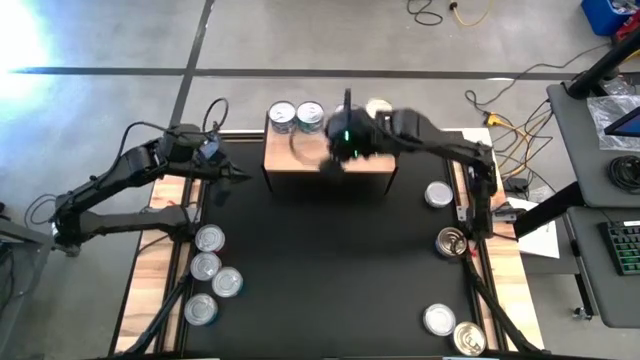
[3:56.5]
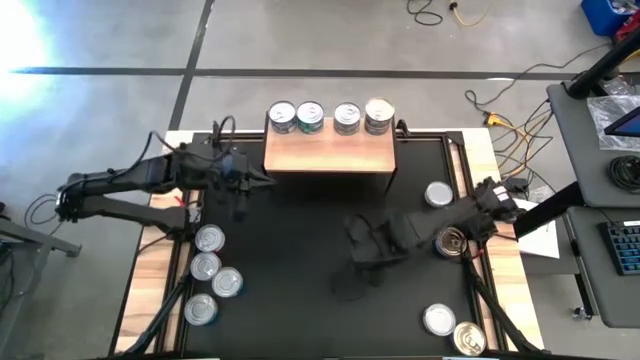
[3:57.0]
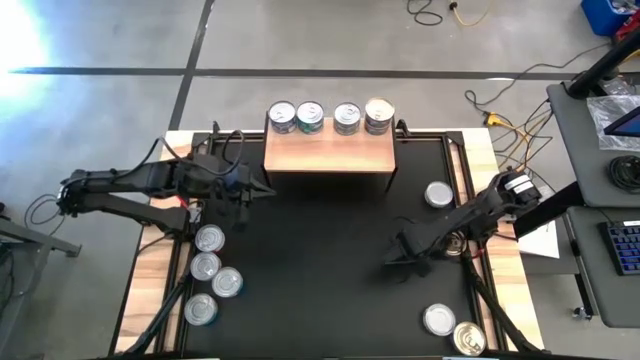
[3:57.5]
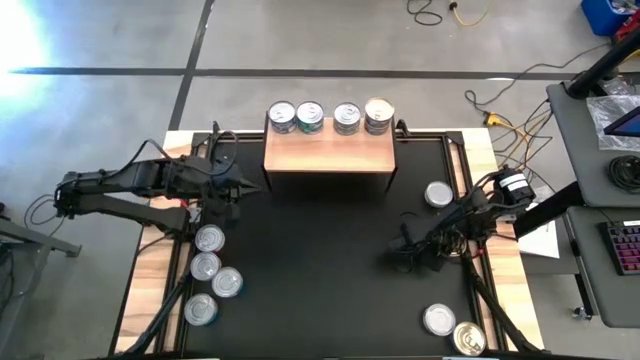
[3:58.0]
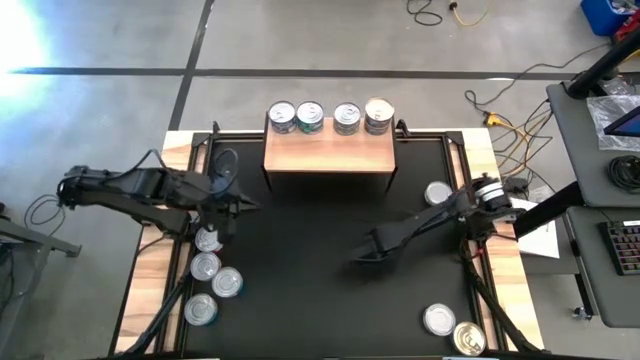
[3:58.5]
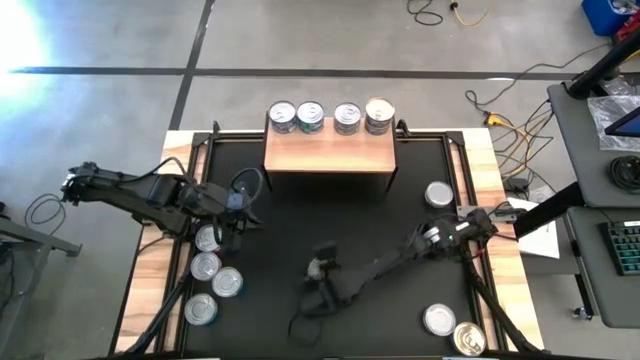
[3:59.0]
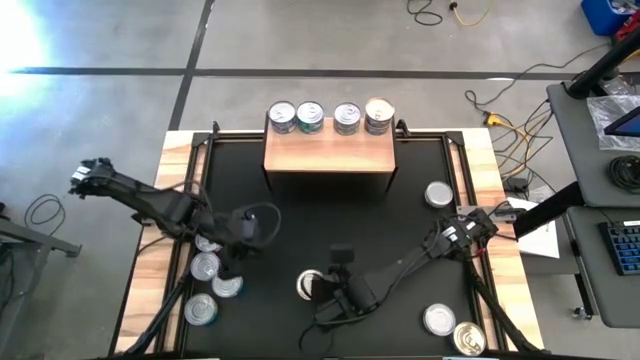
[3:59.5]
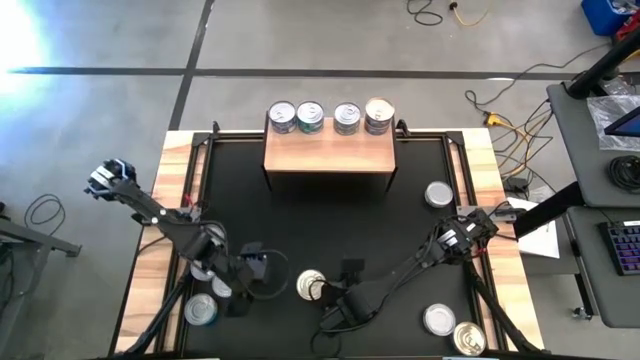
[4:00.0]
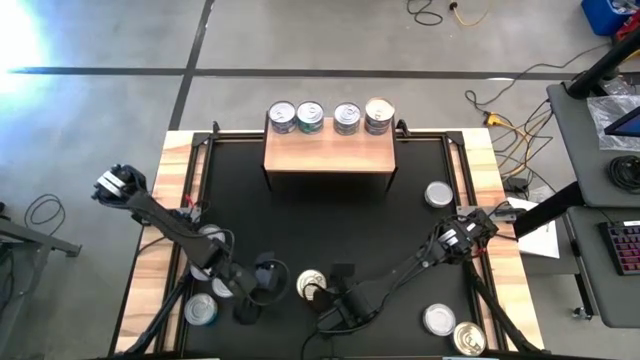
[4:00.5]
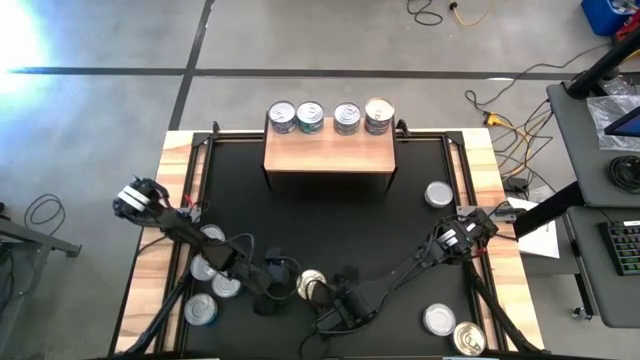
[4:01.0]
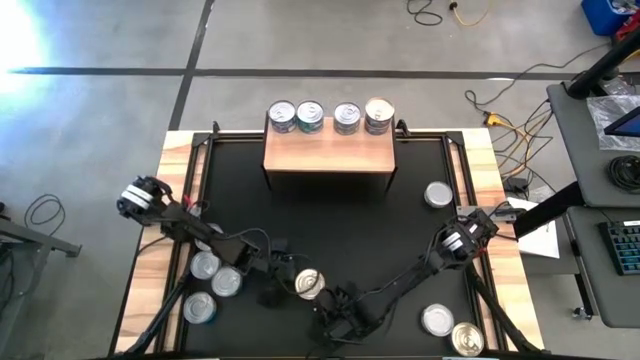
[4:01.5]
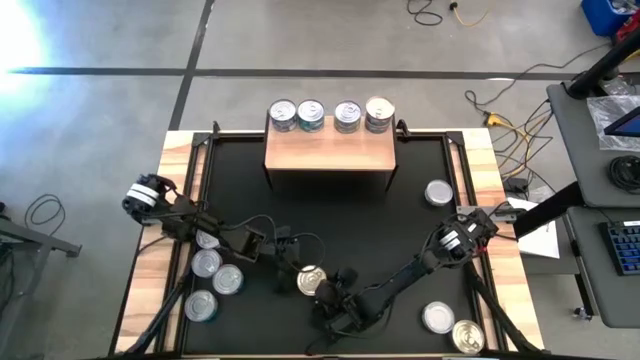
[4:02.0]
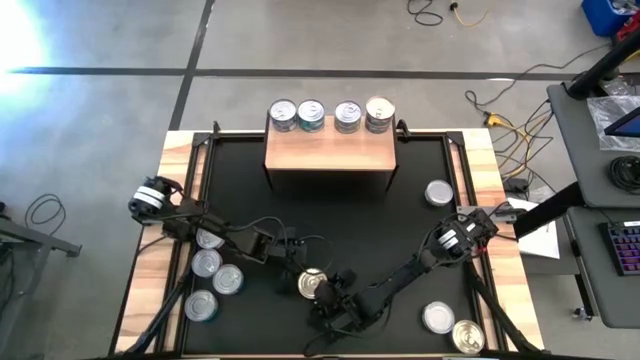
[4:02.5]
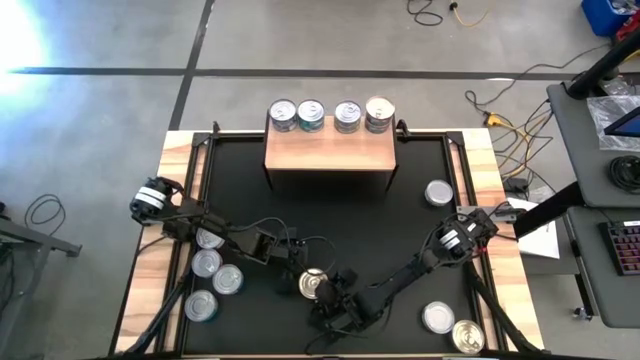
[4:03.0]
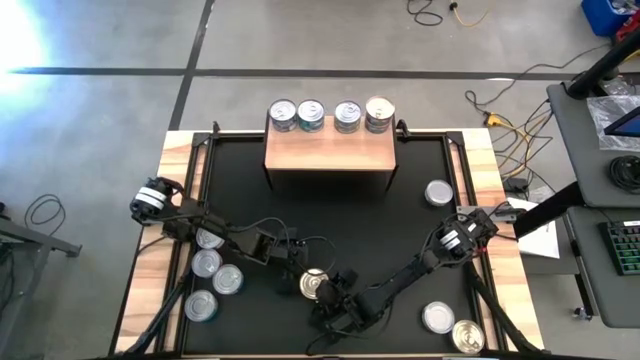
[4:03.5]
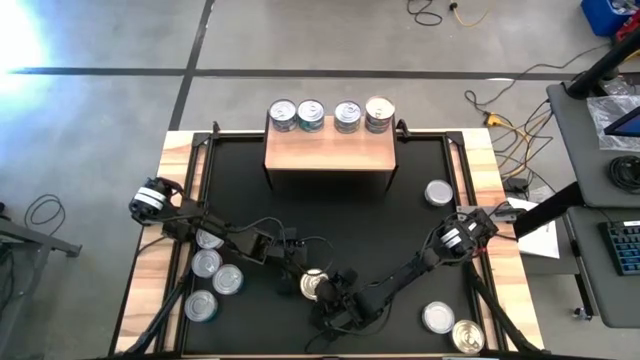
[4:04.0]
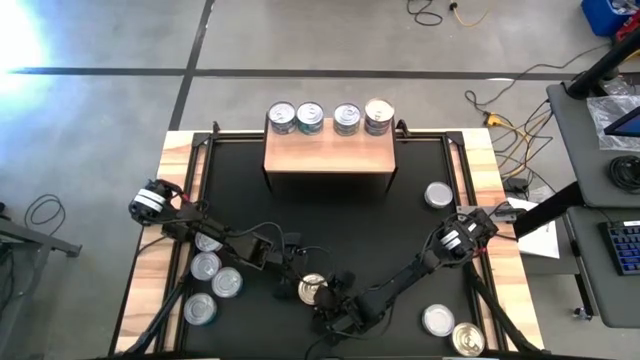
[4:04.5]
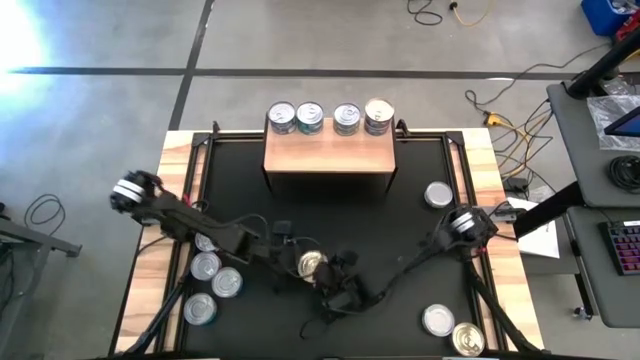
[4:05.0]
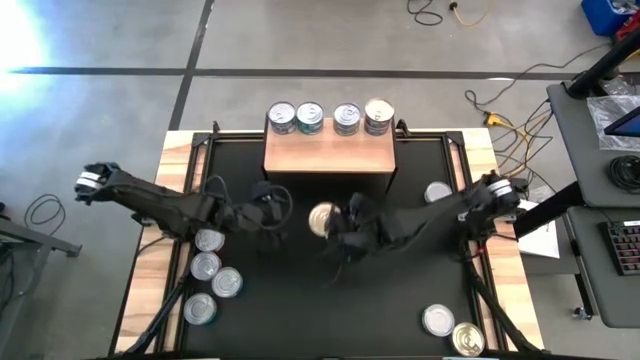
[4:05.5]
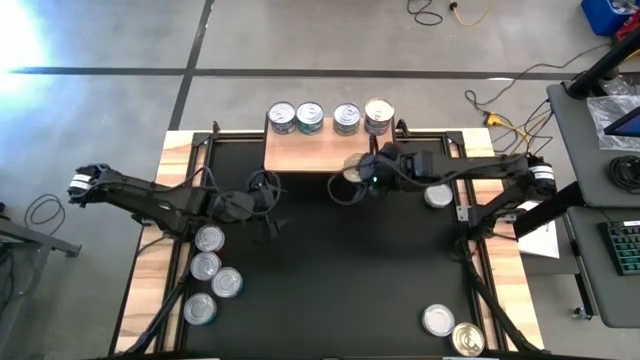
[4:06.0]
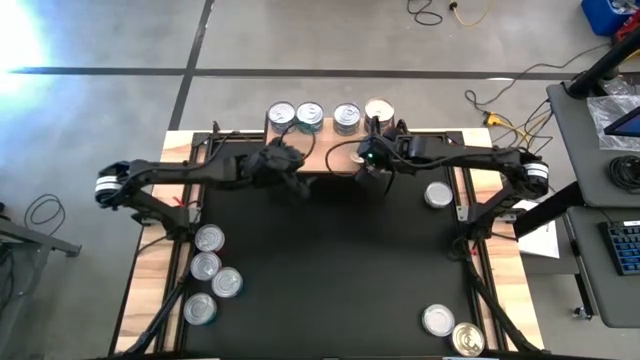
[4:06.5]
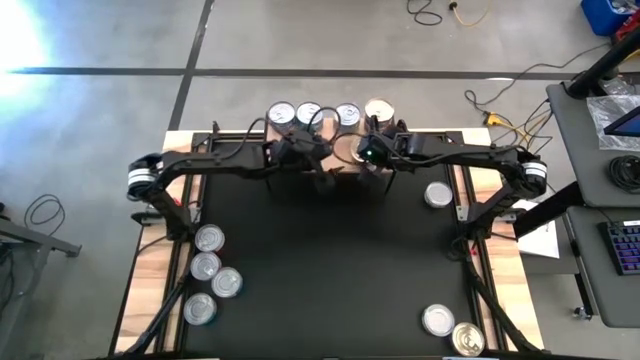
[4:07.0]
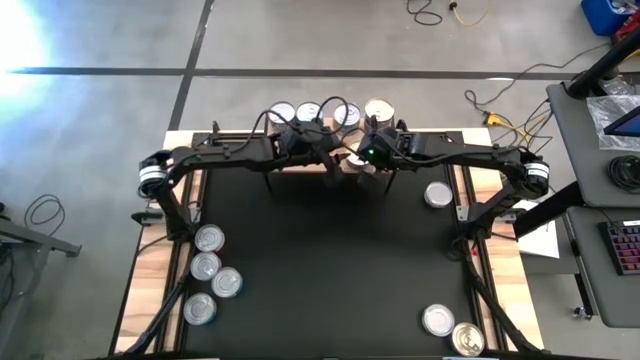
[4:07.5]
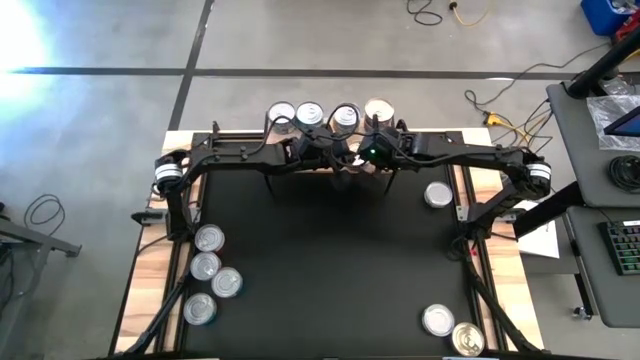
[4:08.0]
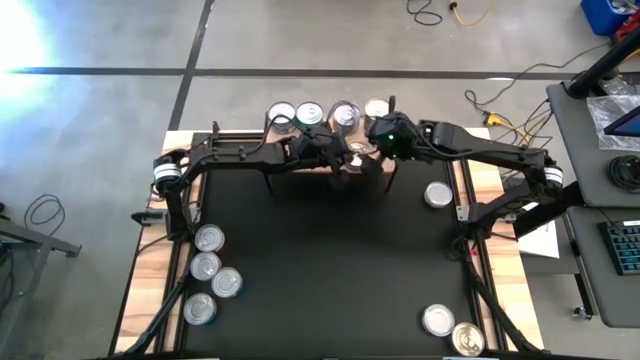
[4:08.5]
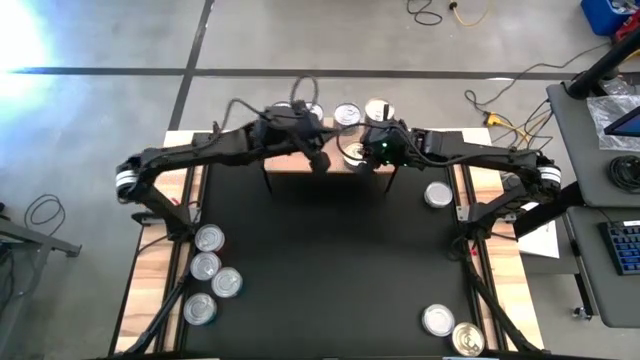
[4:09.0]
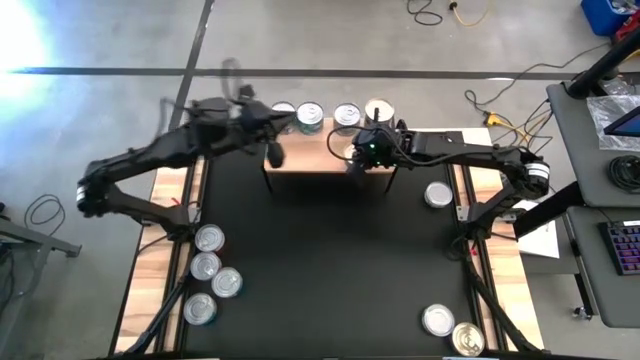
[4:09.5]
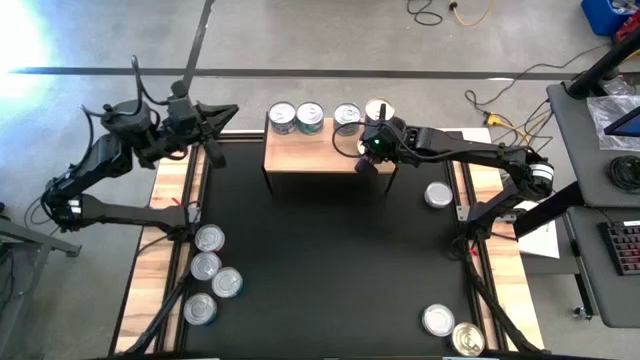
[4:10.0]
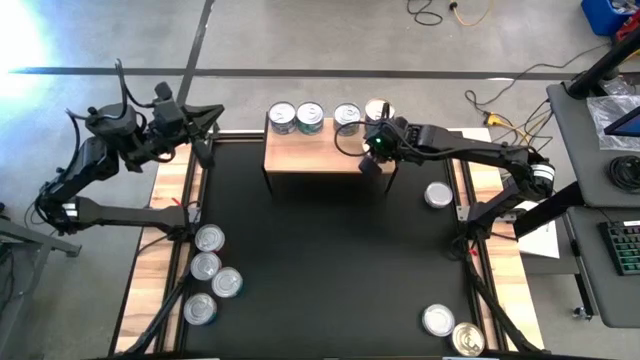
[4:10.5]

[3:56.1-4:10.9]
Task: Stack canned seafood by type on shelf
Put the top blue-pink tuna can on the shelf

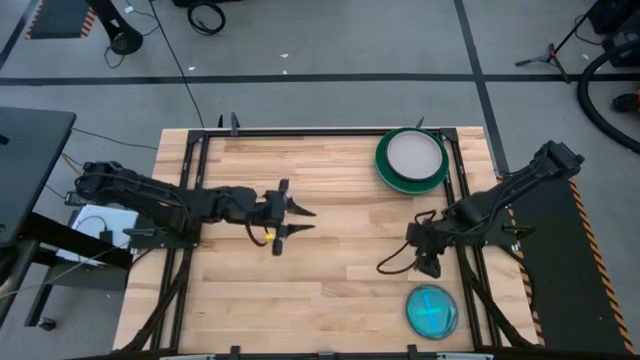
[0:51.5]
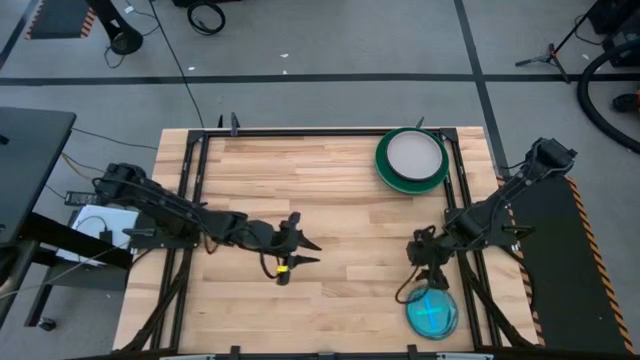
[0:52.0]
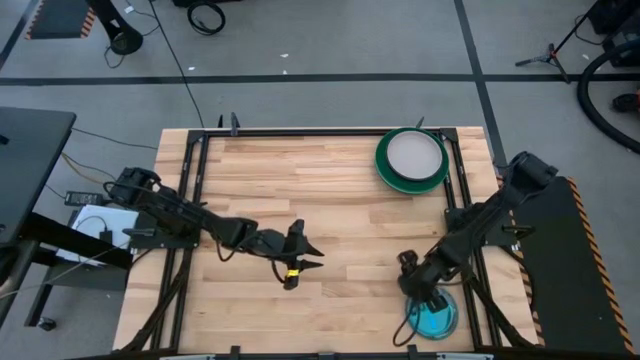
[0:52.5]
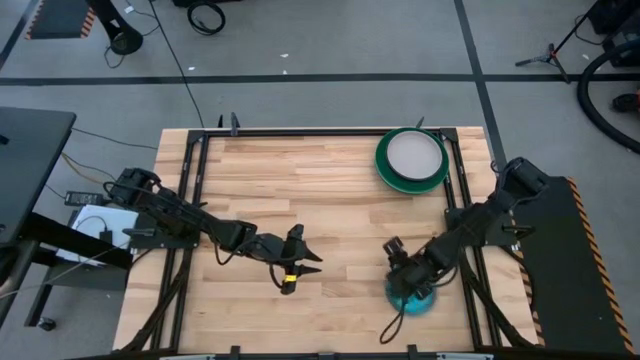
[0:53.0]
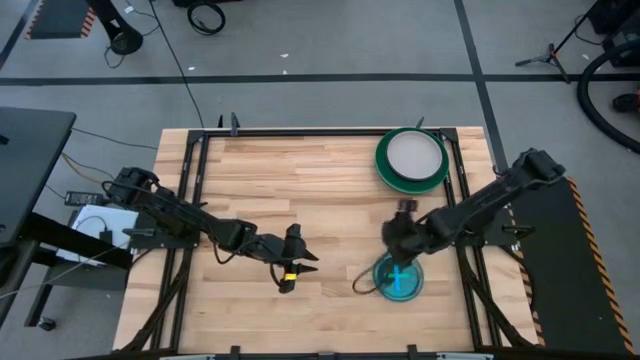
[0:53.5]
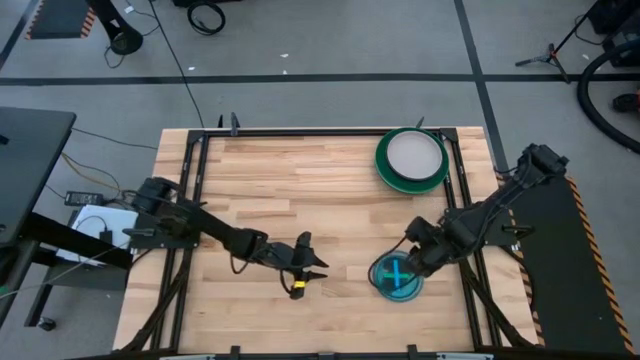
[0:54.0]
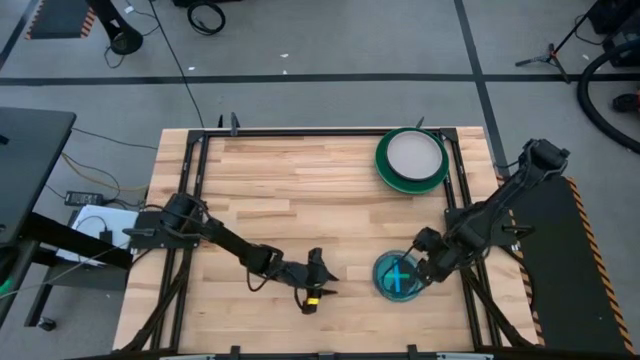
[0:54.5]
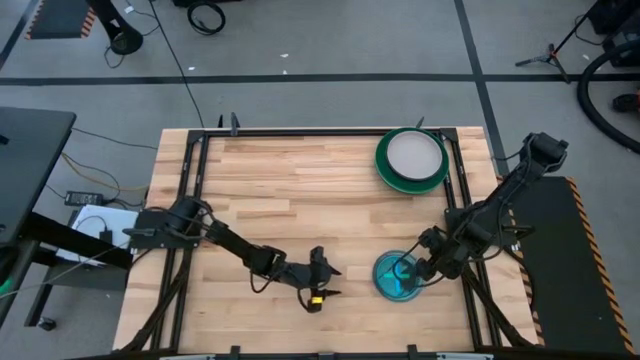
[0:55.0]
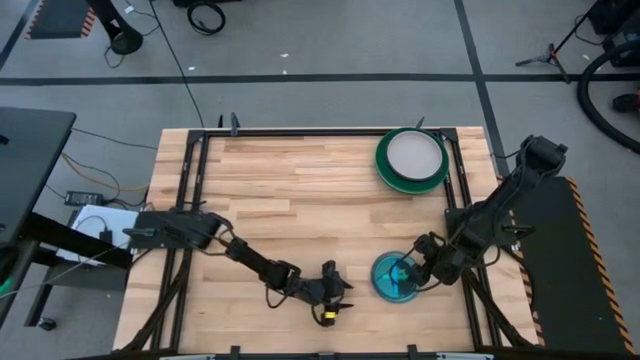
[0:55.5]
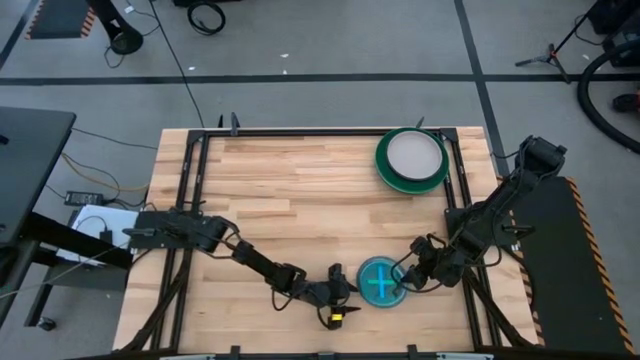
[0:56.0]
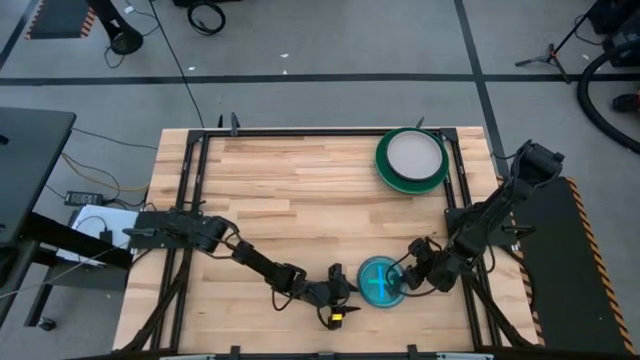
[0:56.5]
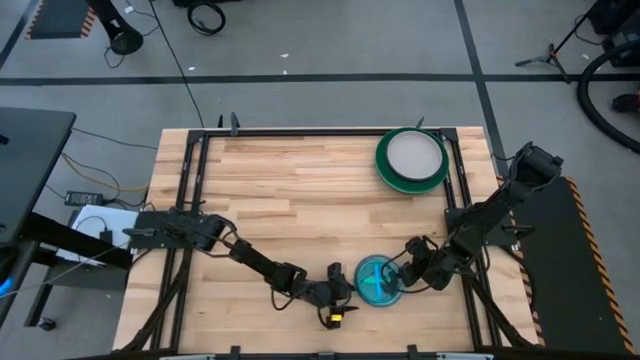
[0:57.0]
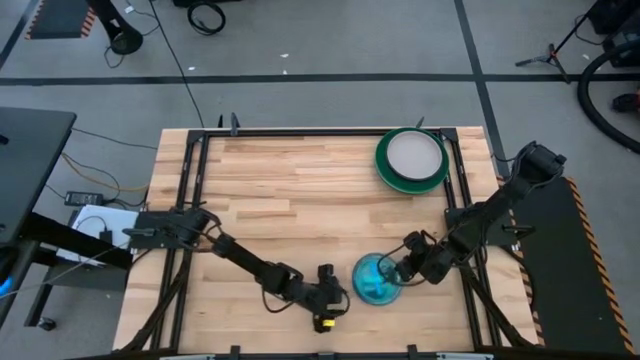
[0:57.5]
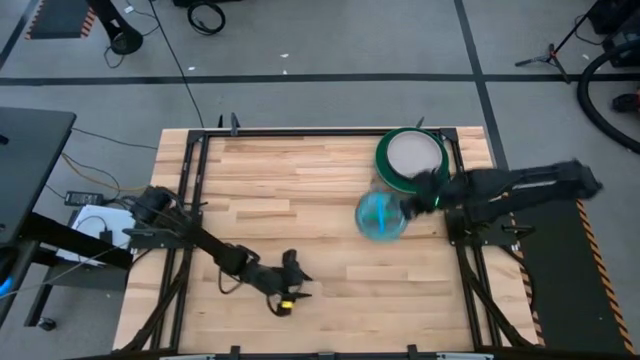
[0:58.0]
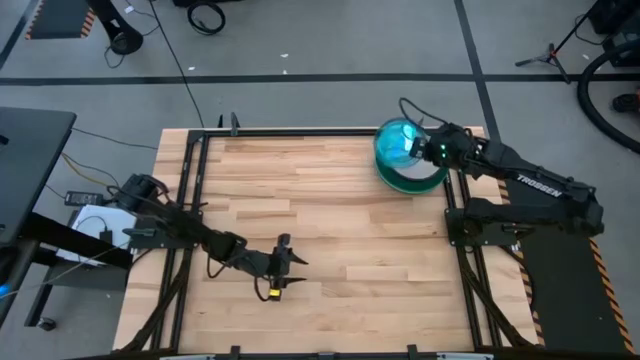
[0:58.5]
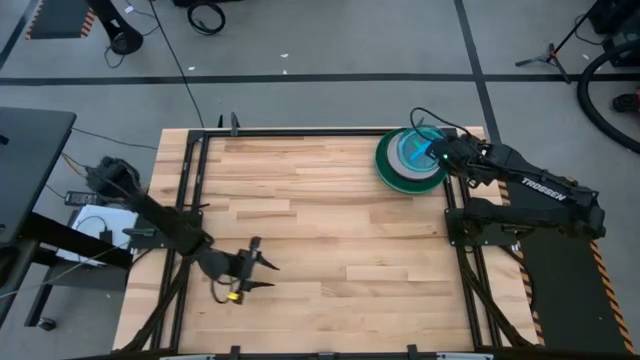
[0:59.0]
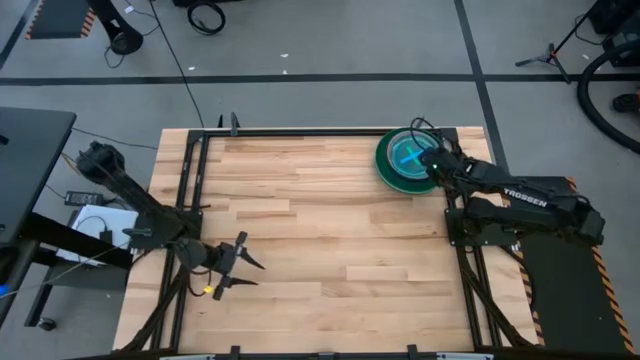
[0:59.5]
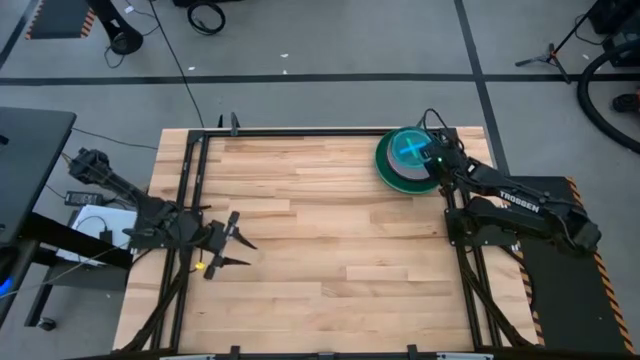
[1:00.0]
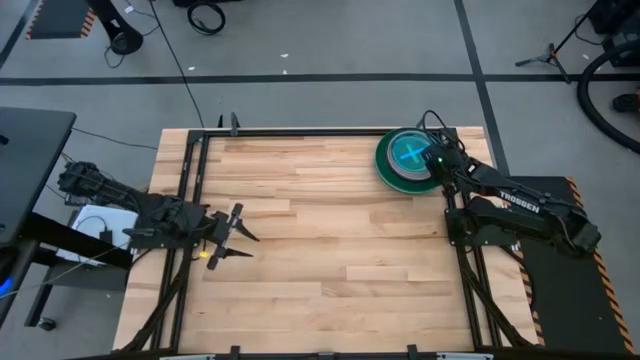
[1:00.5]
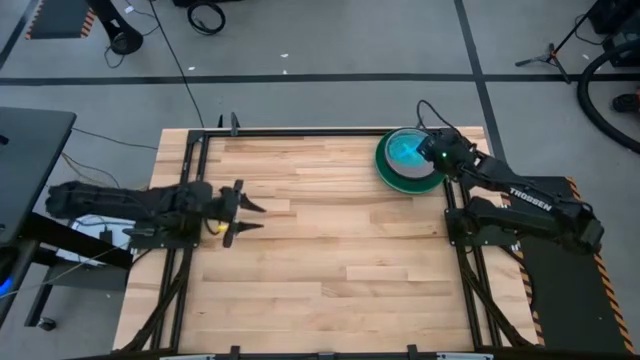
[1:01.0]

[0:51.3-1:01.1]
Task: Stack plastic plates
Stack the stacked plates on top of the white plate
